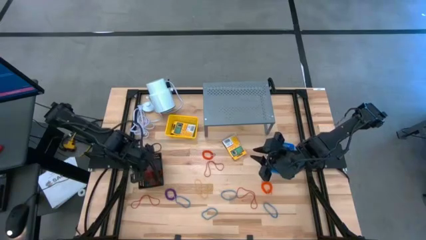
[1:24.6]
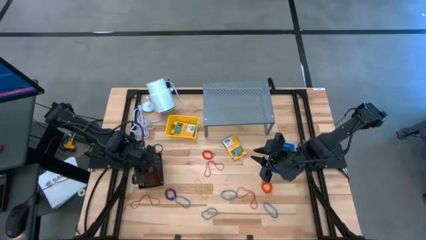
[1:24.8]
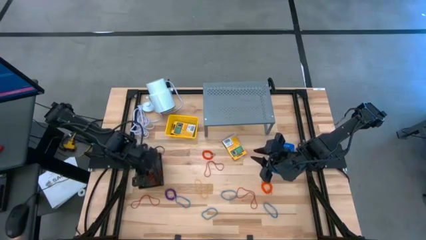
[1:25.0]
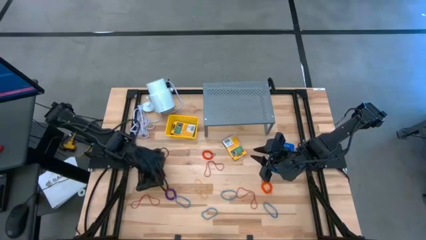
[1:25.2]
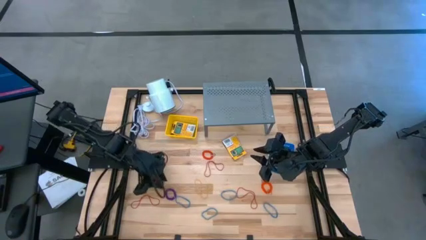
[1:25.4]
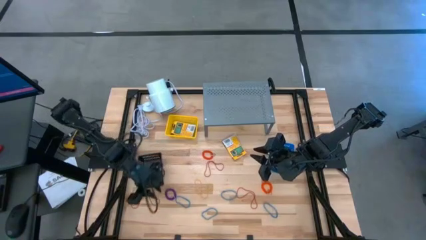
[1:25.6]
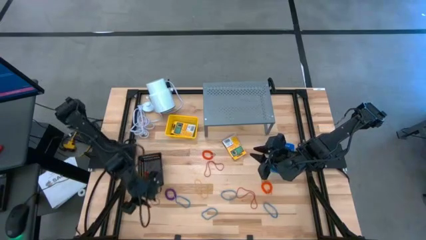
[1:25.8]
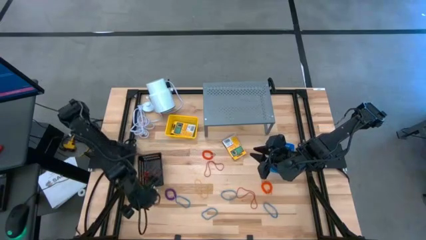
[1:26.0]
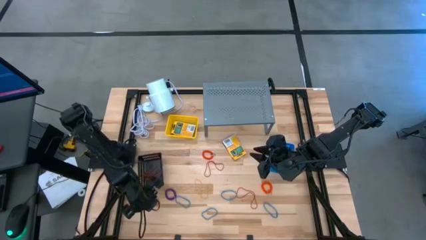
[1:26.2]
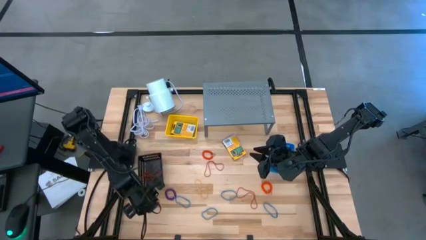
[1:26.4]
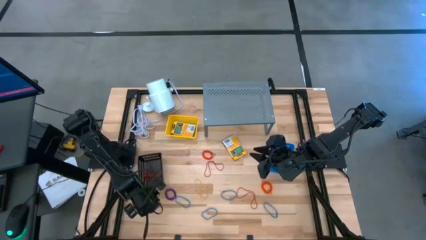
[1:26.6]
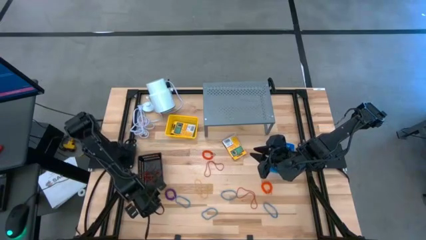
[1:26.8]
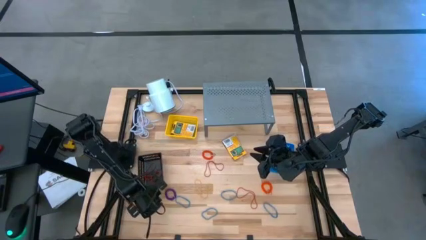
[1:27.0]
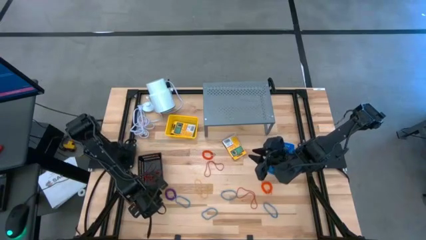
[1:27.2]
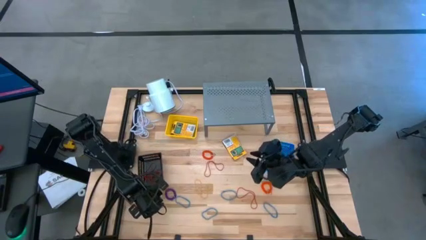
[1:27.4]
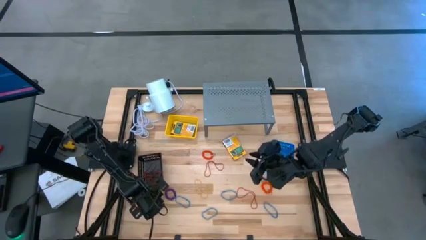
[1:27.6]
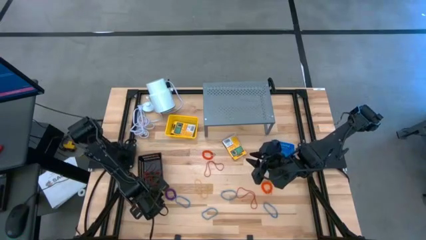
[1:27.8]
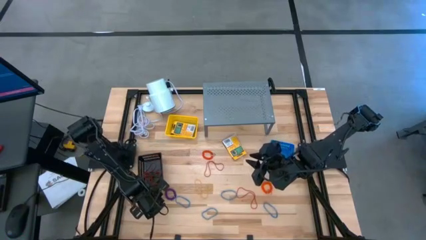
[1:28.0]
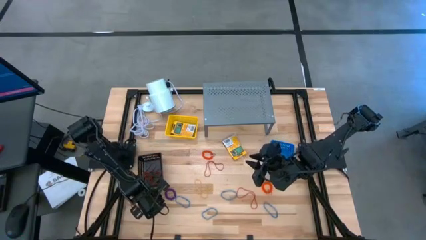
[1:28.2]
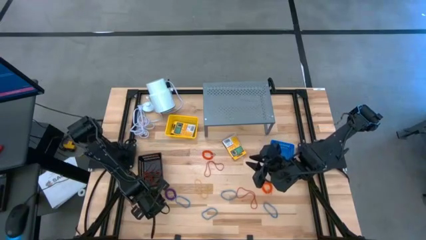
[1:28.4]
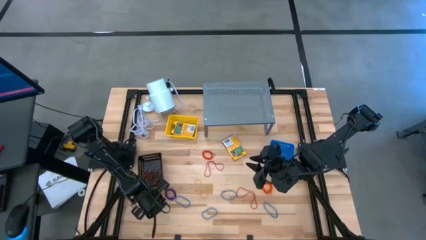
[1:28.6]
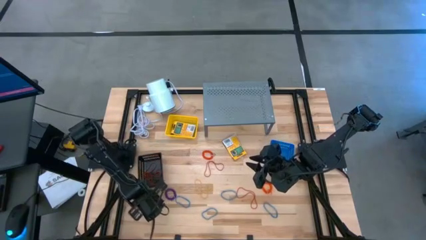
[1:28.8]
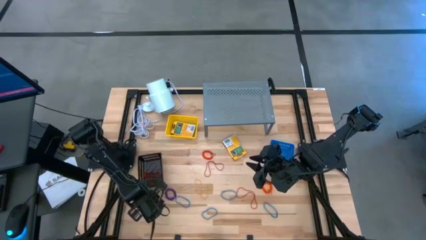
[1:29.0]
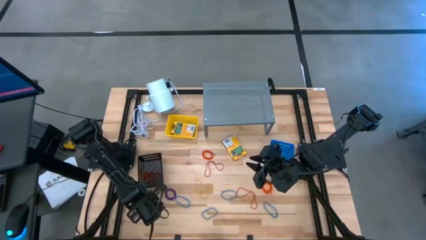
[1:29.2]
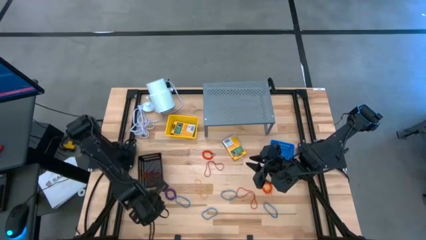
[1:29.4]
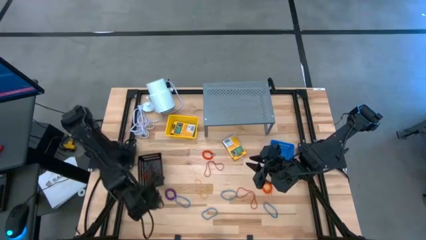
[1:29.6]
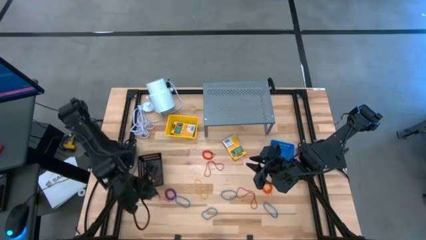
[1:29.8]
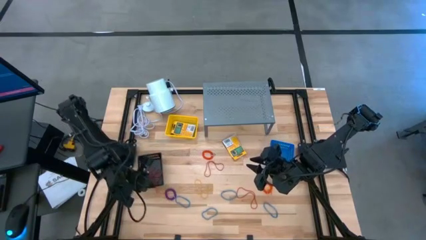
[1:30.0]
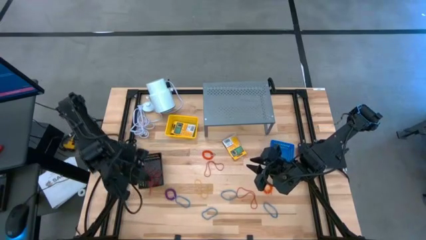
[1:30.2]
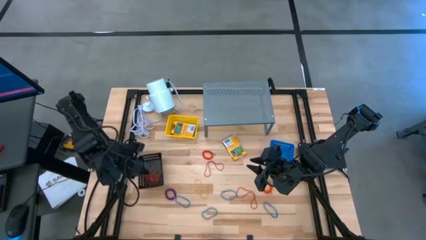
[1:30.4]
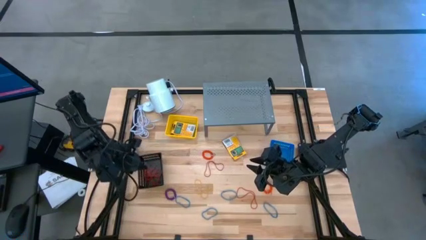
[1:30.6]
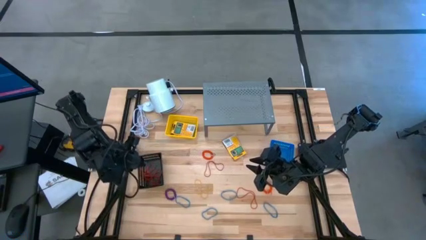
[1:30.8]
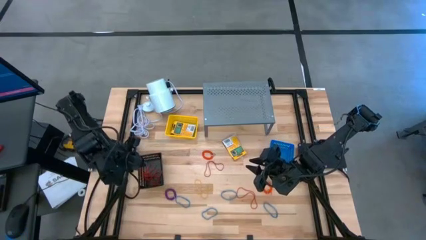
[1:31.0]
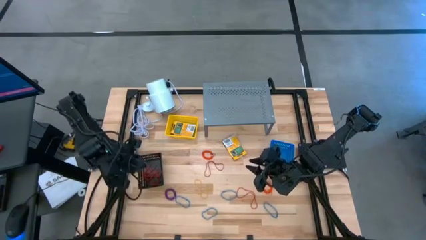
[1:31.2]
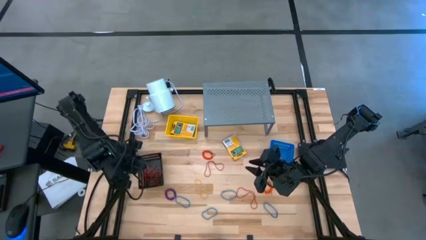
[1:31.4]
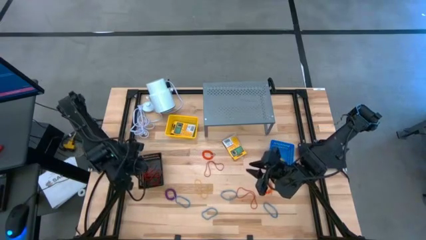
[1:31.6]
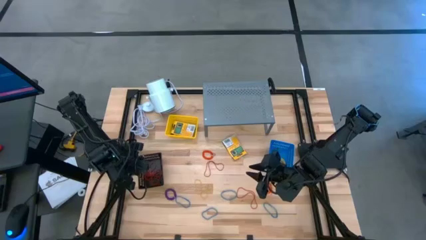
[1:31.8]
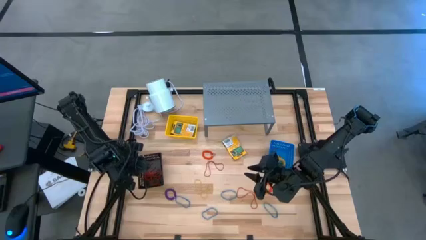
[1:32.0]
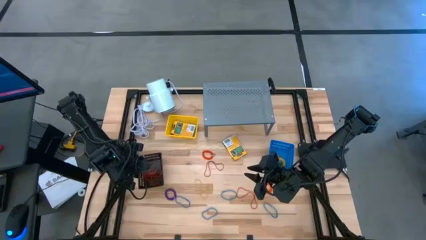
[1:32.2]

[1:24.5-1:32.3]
Task: Pick & Place Office Desk Supplies
Put the red rubber band into the black bin

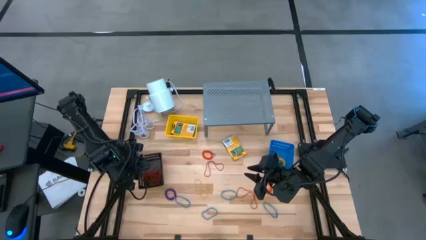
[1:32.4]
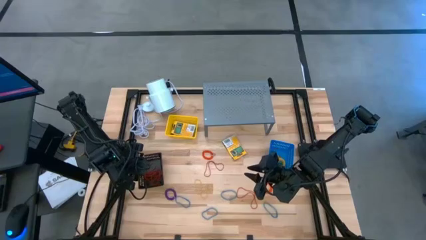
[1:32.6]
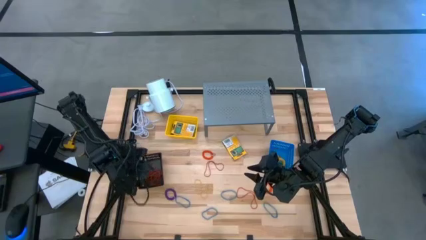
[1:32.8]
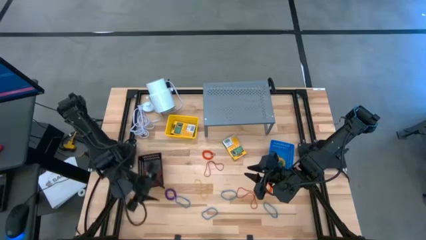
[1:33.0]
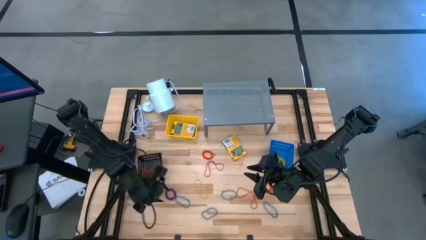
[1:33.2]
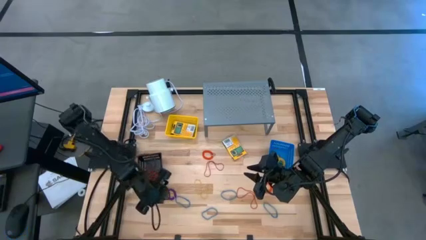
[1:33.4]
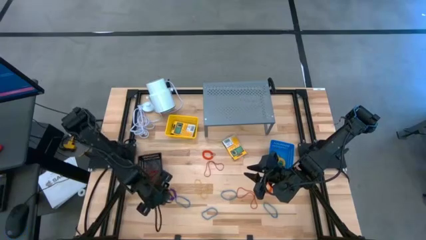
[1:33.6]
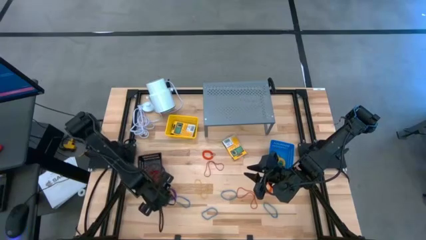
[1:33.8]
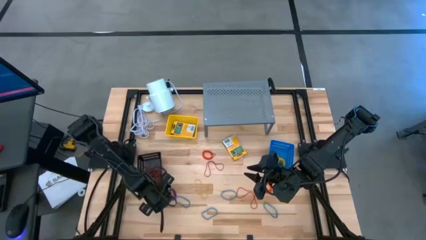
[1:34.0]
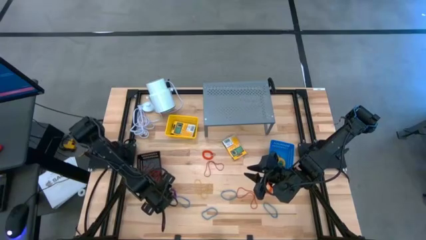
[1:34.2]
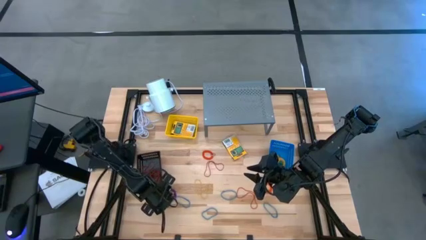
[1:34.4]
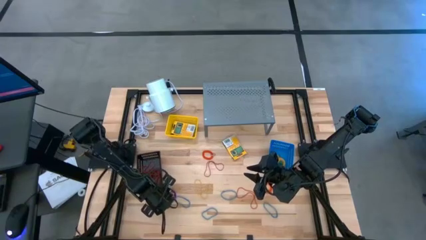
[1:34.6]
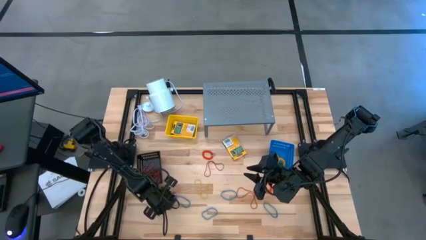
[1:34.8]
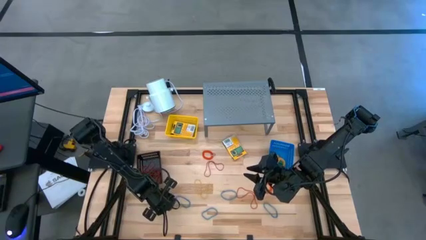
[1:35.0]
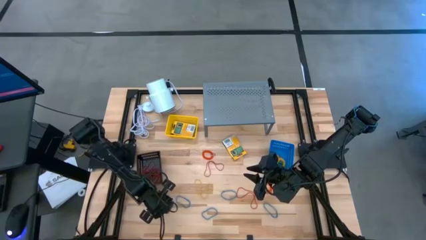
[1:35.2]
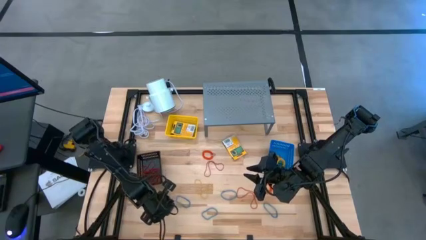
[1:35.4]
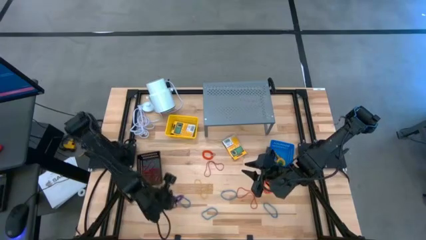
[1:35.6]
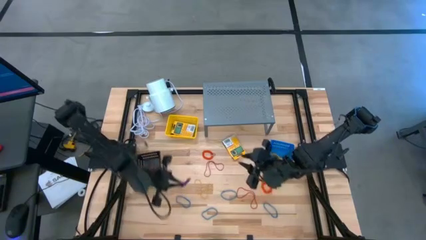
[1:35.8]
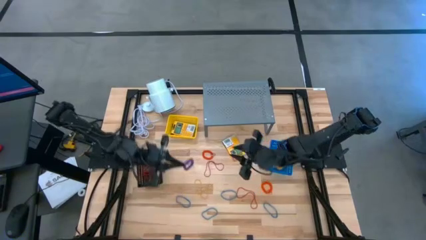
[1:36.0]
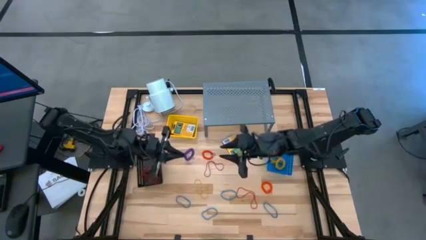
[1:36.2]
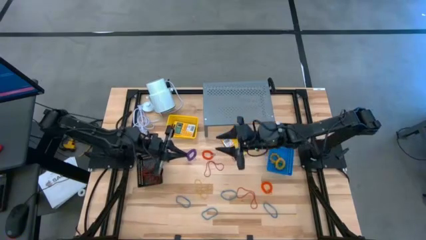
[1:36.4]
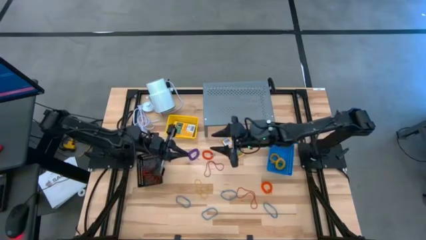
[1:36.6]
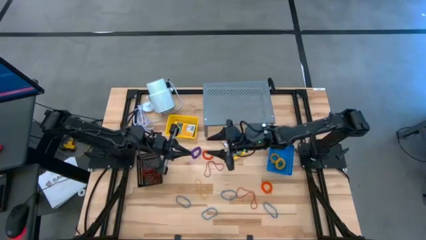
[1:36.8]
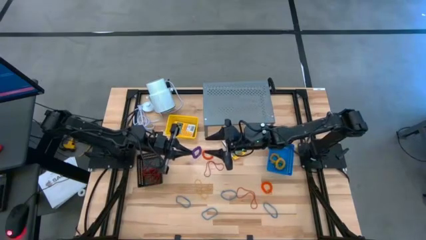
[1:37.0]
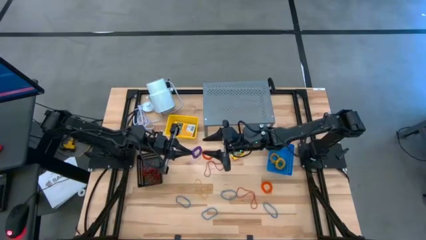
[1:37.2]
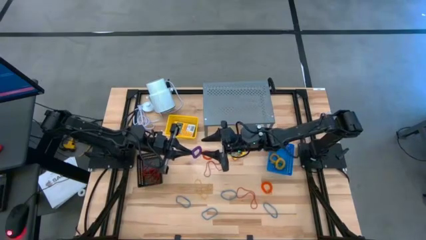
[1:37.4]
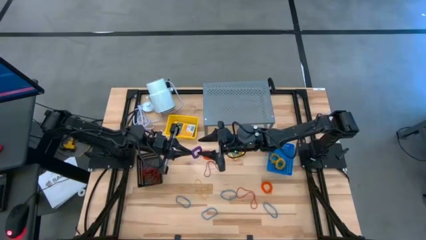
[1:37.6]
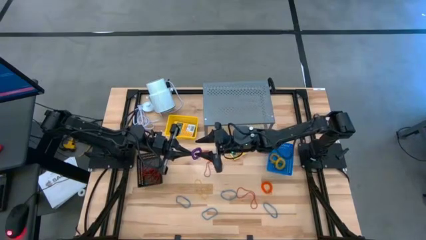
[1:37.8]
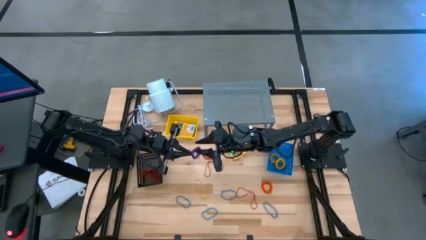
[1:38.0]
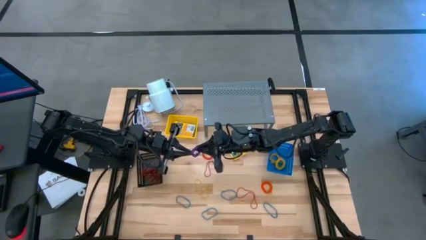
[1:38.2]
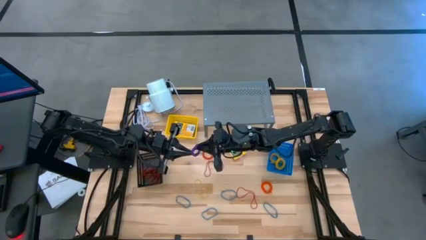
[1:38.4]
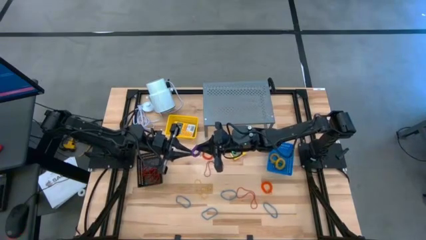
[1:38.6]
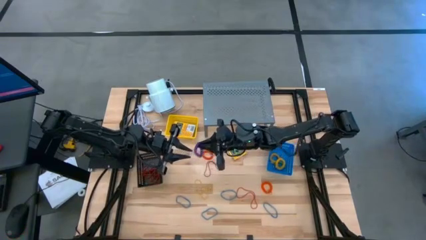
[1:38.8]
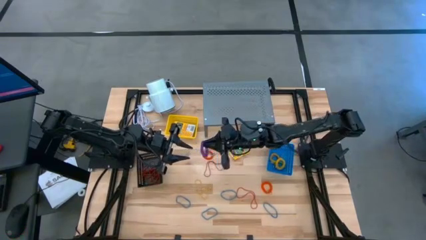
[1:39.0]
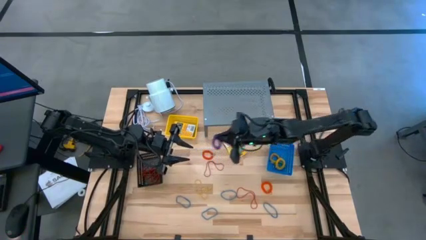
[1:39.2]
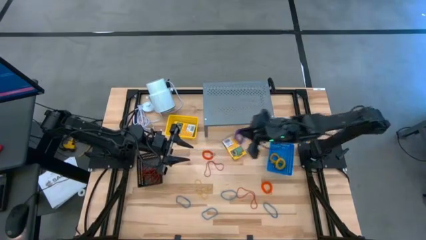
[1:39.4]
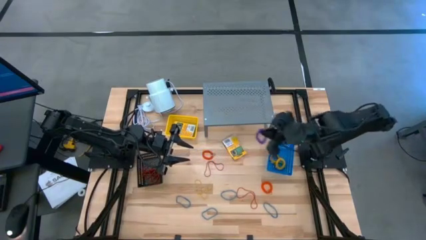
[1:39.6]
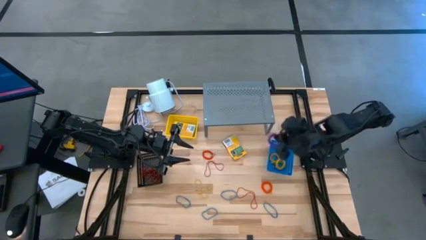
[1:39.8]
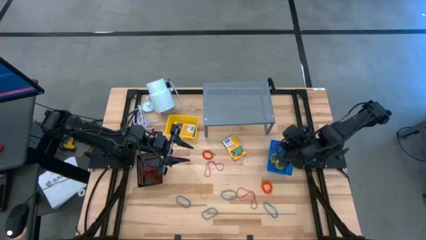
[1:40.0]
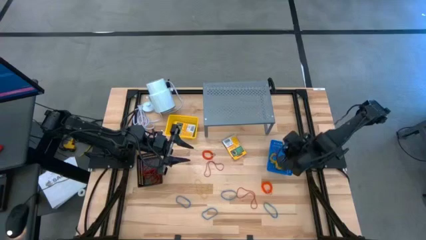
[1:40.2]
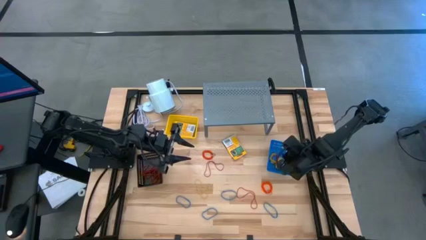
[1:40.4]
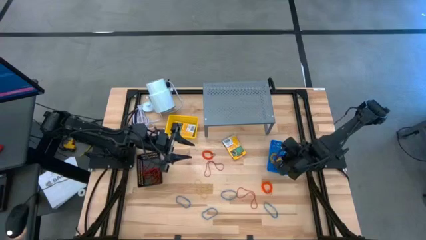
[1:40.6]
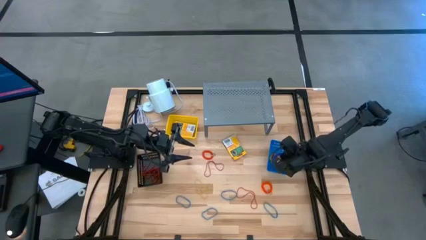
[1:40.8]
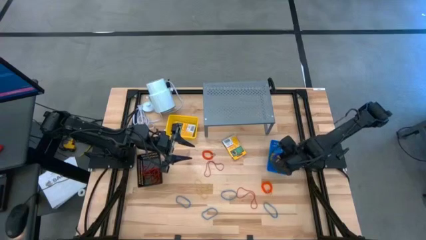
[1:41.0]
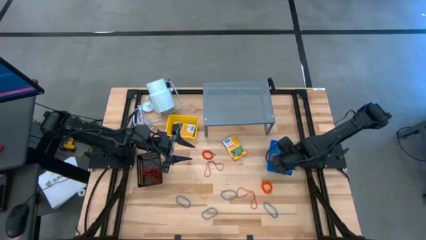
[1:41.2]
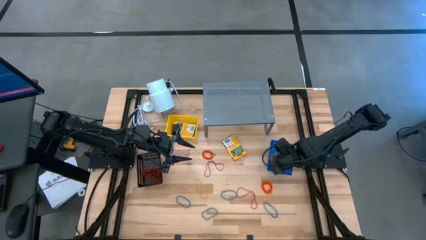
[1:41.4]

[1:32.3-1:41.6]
Put the violet spring keychain into the blue bin
